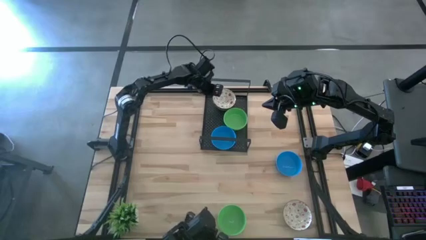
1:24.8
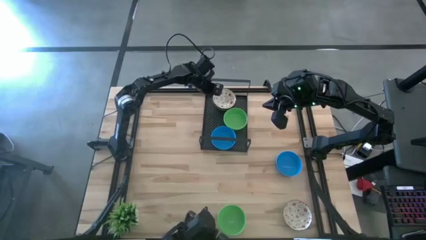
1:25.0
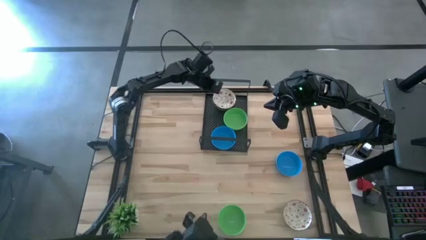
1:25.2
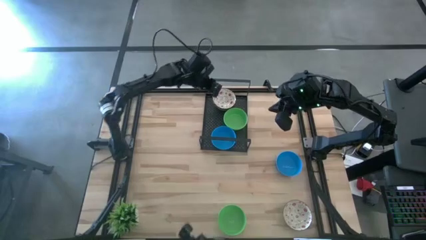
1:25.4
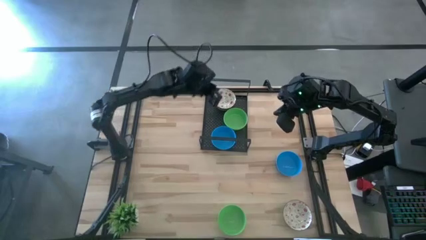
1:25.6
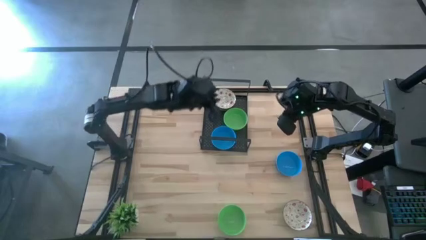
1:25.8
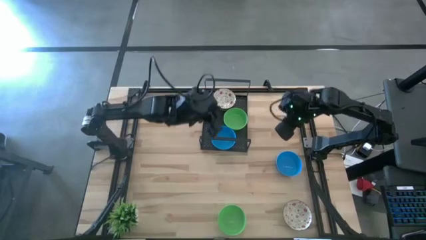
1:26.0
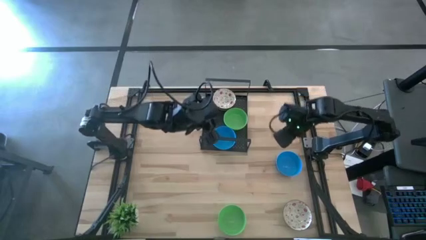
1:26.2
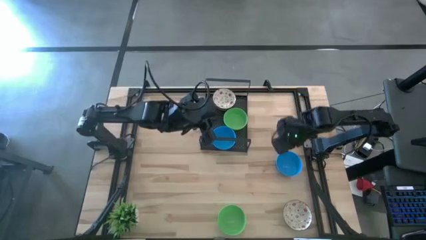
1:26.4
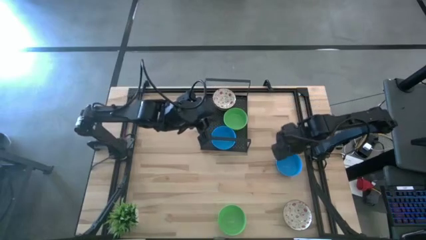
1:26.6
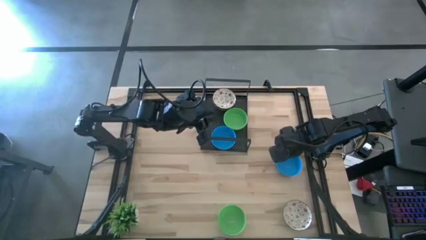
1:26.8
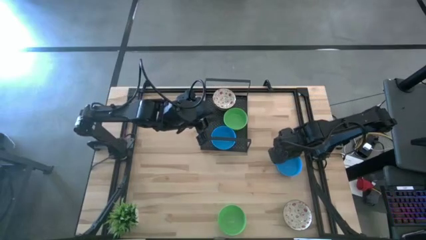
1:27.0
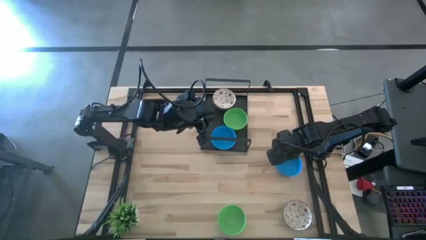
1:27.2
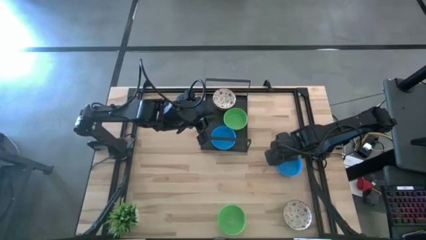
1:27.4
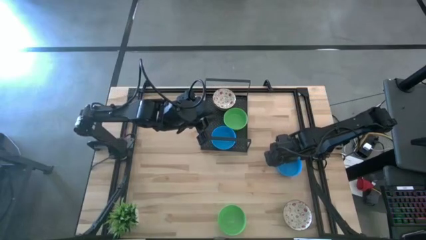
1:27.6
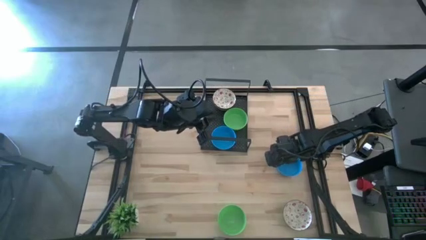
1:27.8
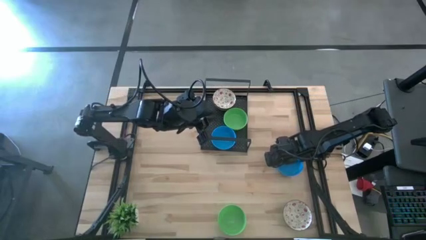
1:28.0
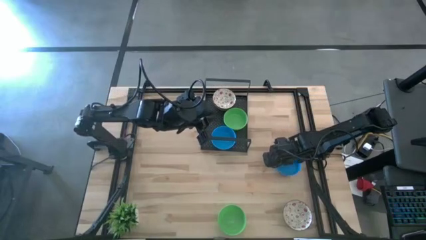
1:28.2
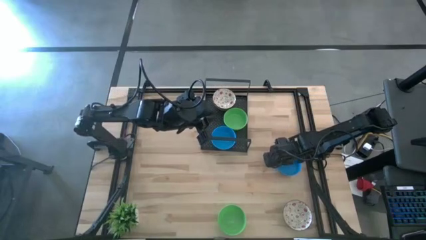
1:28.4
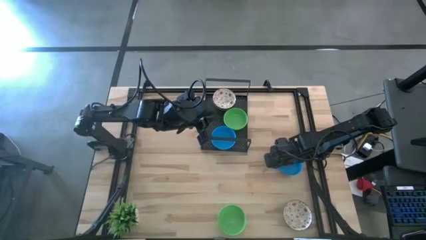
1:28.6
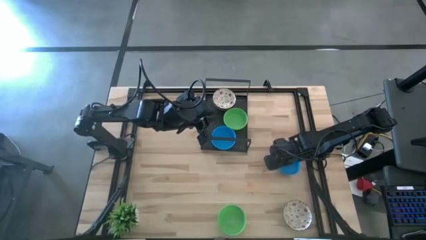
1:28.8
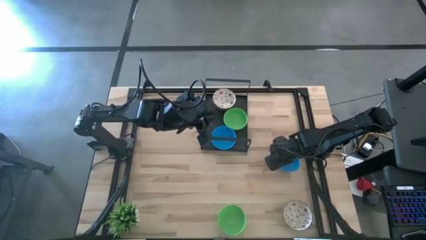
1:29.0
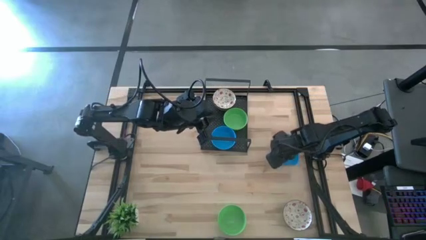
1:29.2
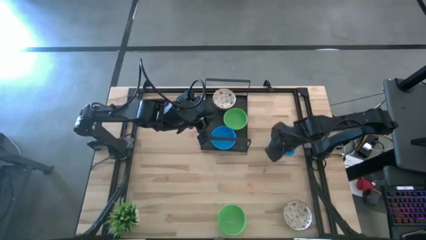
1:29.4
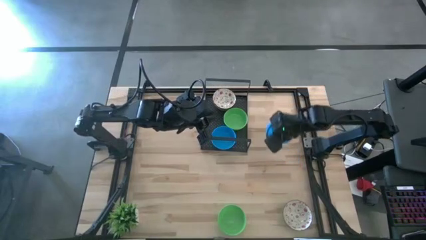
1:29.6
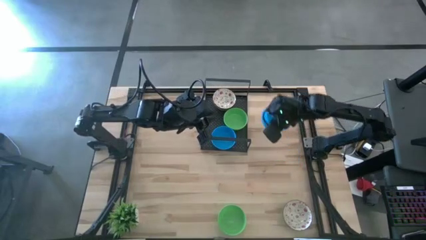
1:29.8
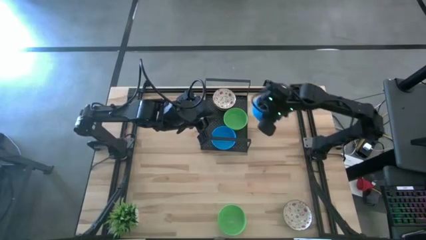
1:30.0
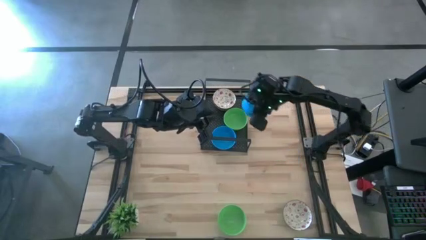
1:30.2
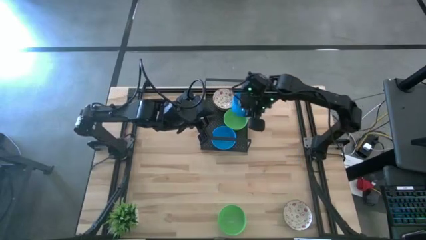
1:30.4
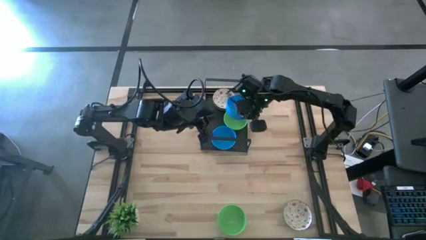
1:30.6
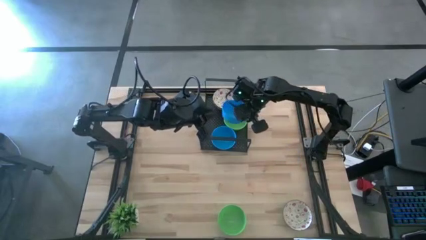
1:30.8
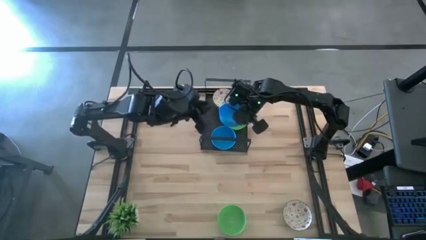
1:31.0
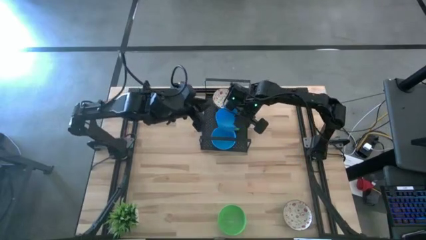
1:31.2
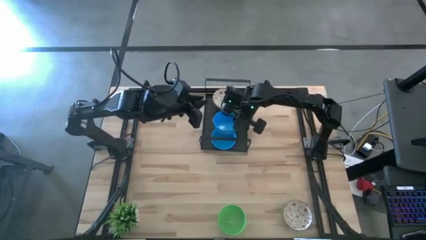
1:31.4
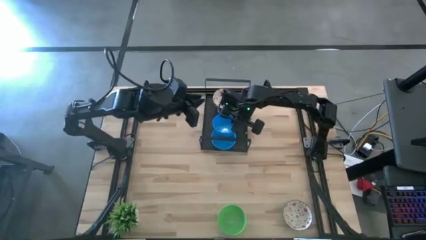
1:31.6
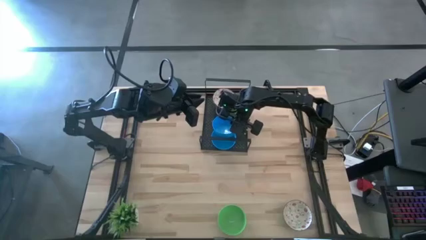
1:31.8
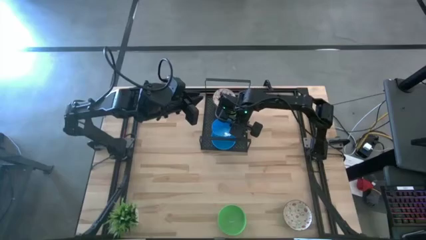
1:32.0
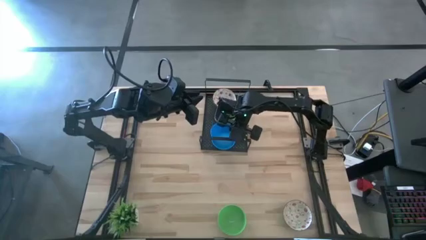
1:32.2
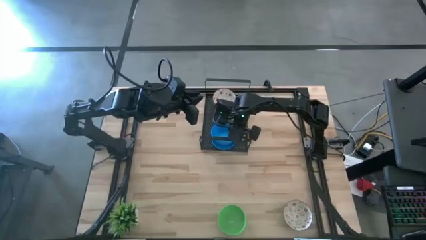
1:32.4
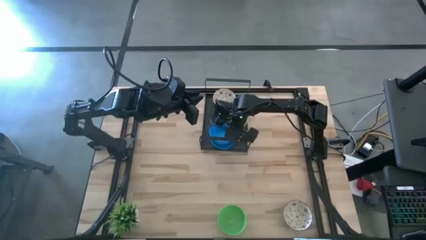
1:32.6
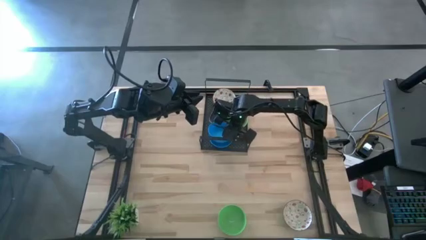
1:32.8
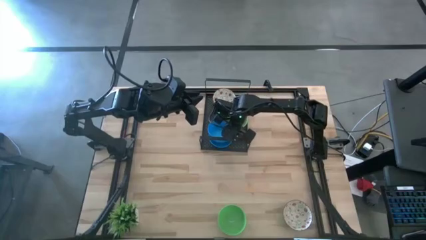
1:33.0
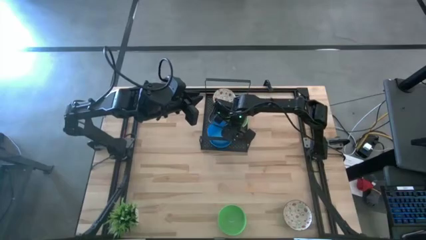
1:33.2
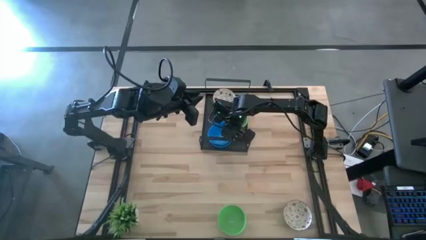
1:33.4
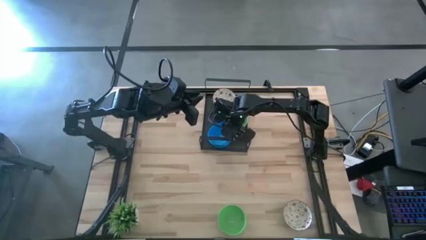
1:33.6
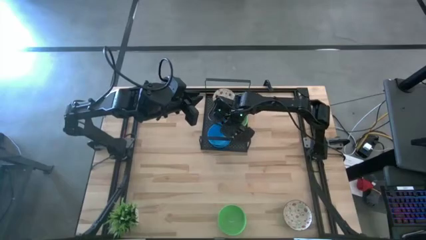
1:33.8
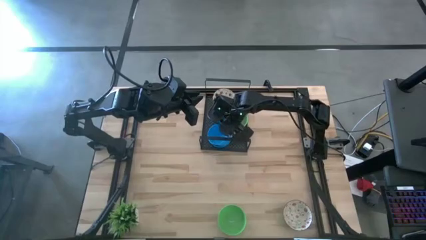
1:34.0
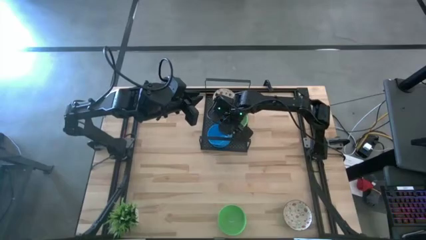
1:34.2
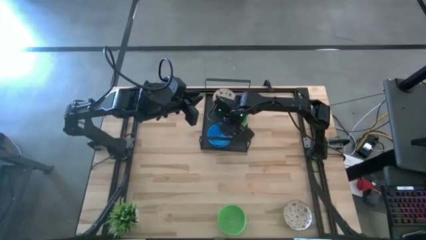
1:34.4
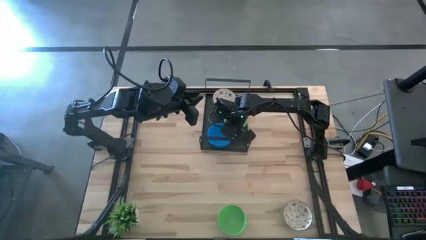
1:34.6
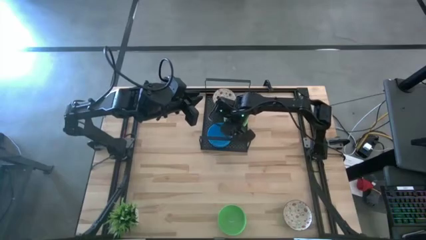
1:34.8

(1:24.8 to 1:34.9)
Task: Pick & Place Mini bowls
Stack the blue bowl on the blue bowl on the shelf

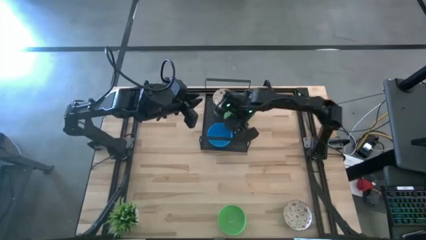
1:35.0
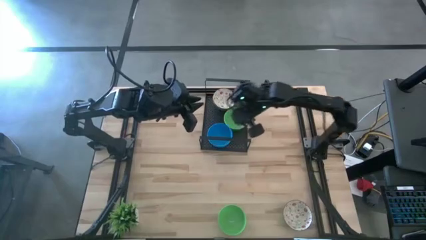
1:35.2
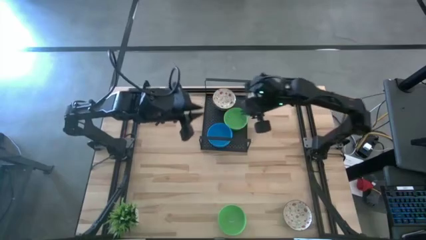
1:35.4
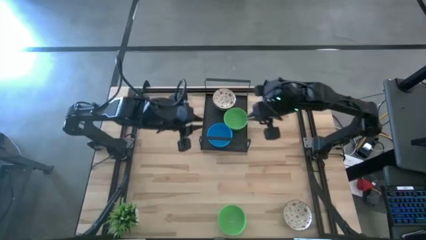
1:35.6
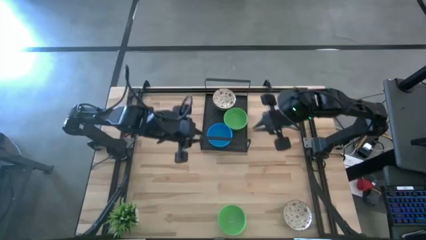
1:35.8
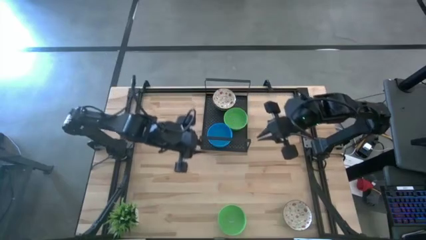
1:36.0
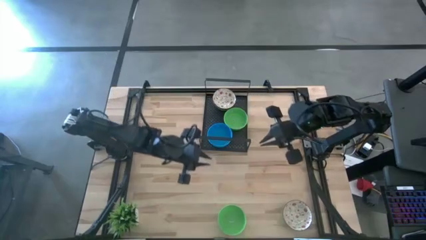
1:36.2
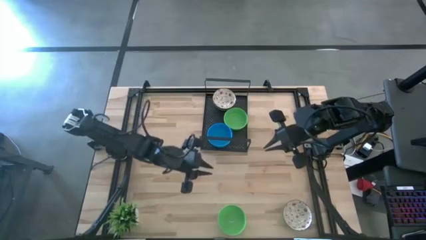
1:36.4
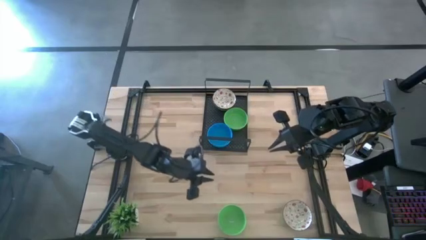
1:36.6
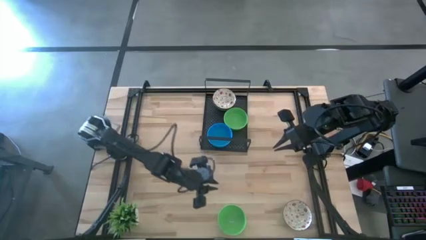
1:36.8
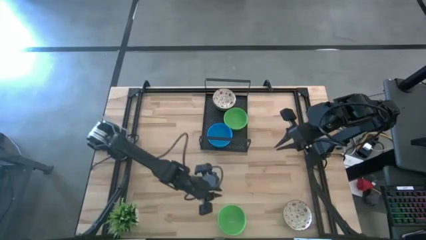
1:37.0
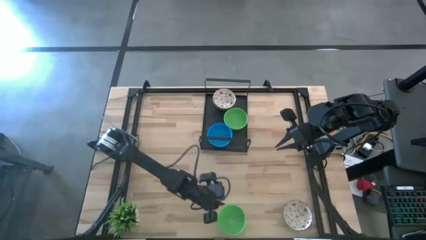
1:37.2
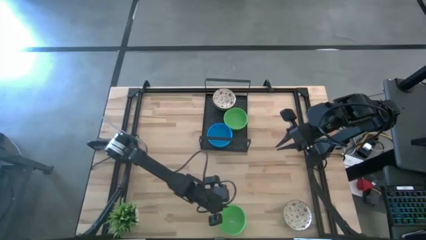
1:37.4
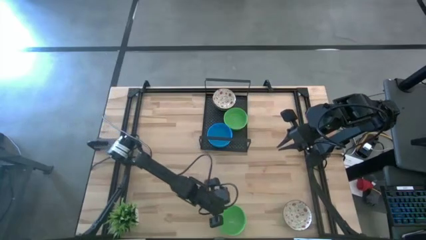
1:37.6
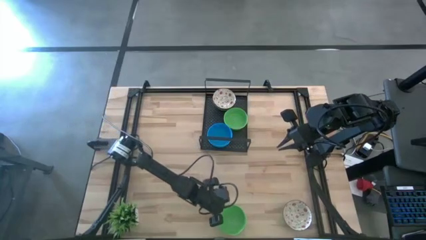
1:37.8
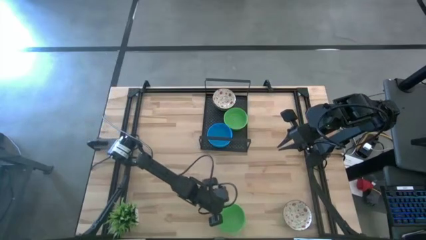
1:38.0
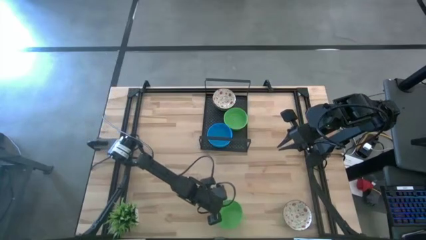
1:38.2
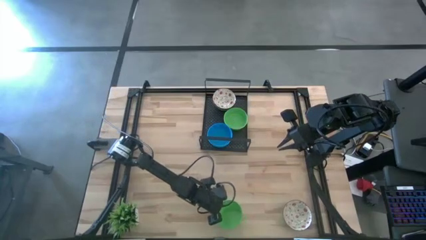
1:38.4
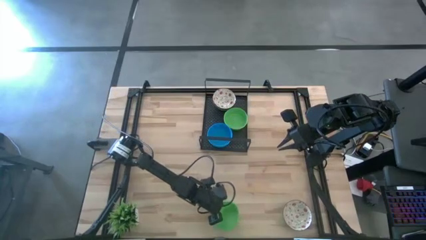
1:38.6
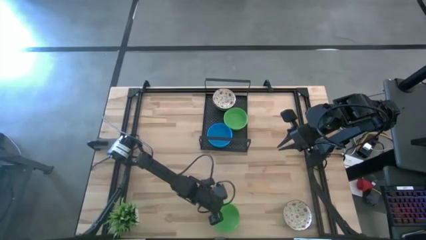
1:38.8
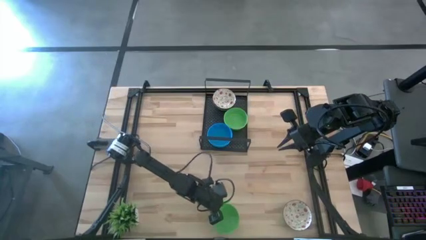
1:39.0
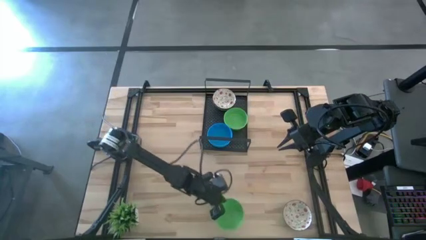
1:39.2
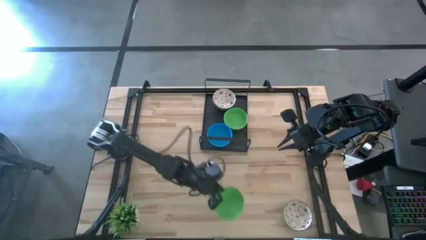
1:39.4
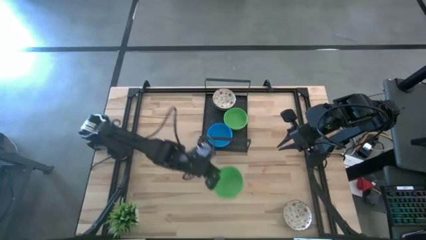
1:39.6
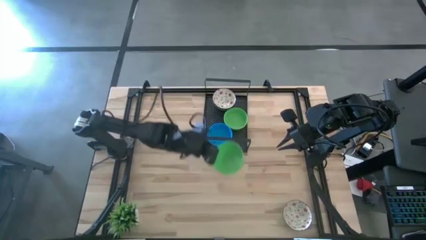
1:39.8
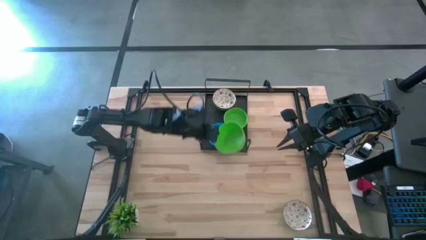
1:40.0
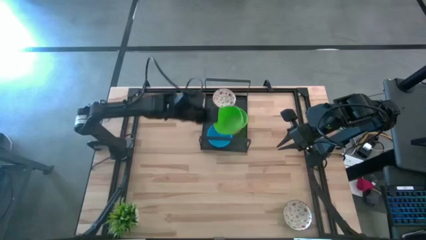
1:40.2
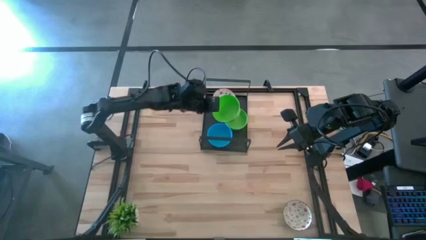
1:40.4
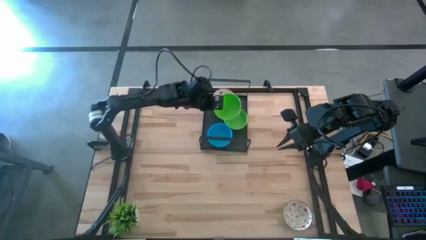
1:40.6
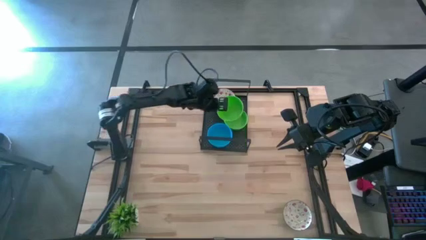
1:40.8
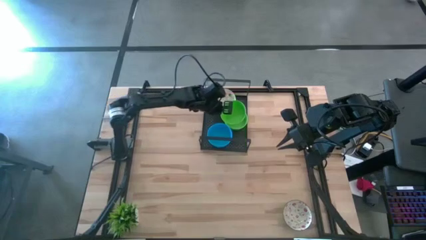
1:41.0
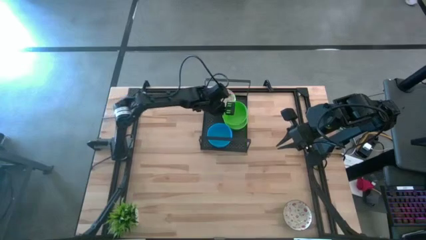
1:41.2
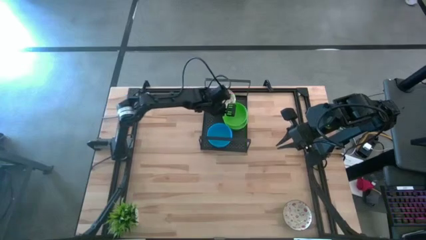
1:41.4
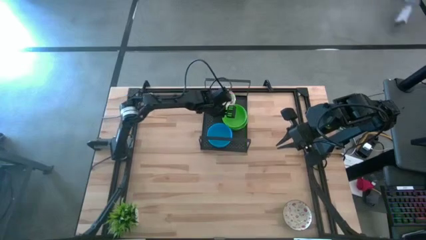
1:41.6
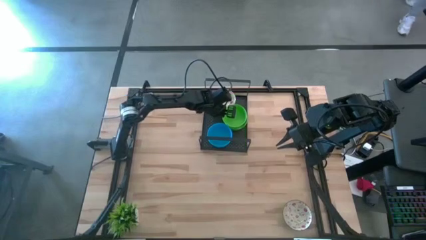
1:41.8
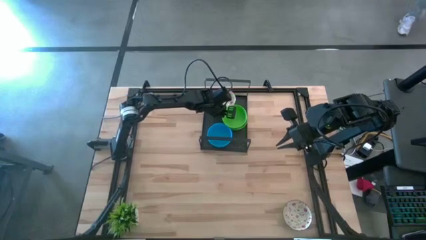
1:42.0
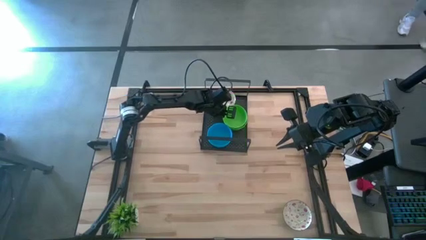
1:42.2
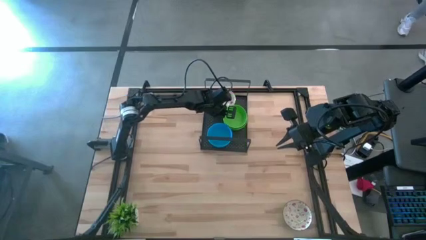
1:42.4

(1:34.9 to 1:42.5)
Stack the green bowl on the green bowl on the shelf
